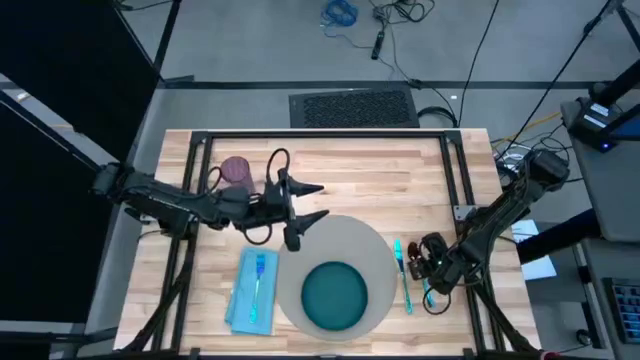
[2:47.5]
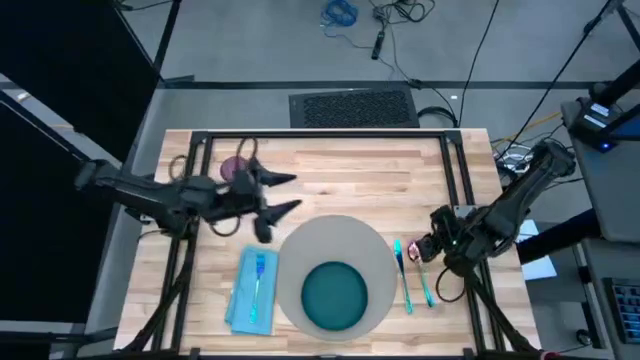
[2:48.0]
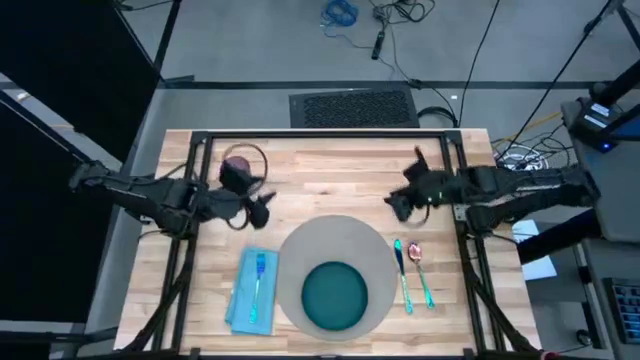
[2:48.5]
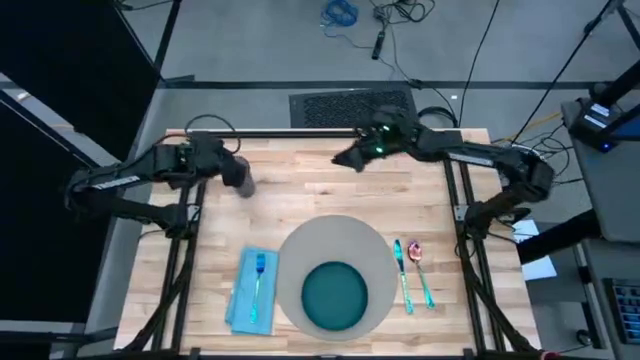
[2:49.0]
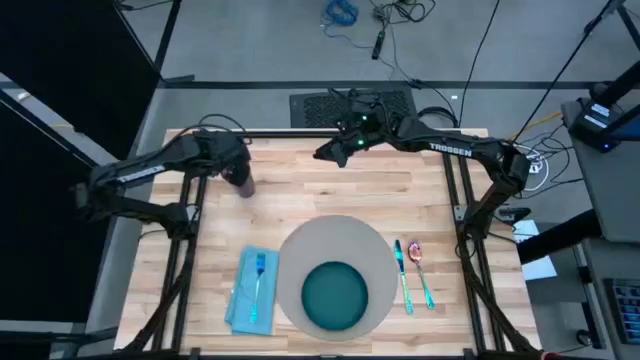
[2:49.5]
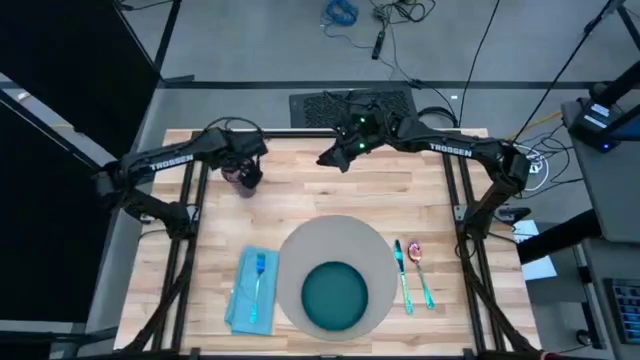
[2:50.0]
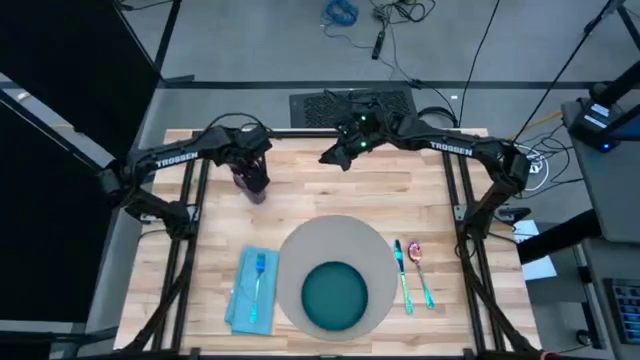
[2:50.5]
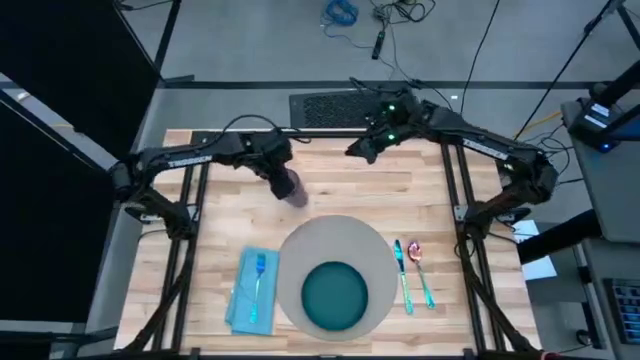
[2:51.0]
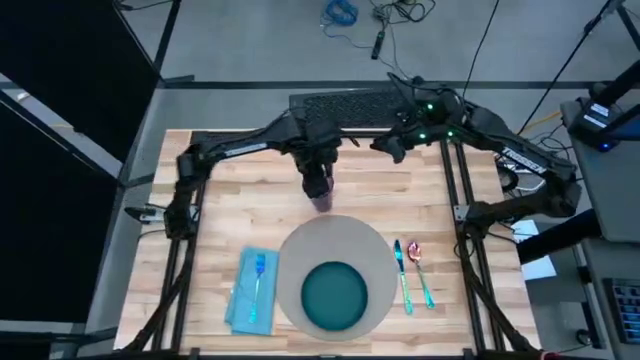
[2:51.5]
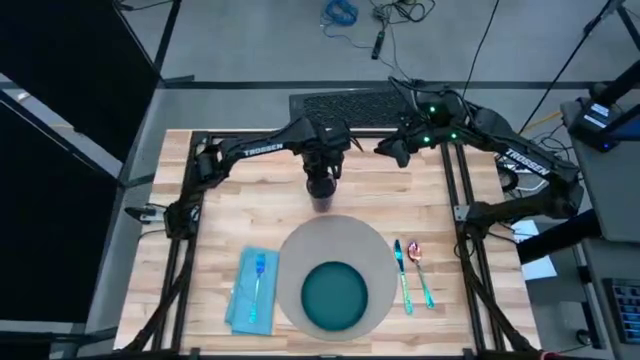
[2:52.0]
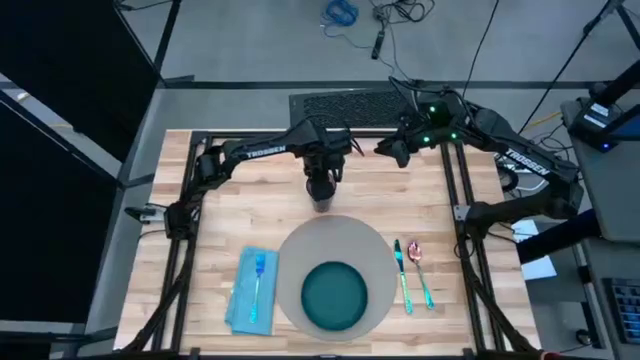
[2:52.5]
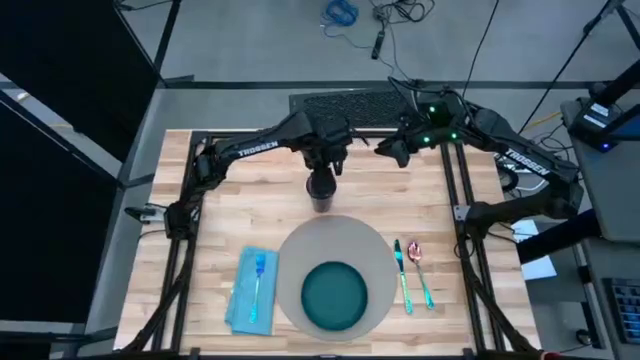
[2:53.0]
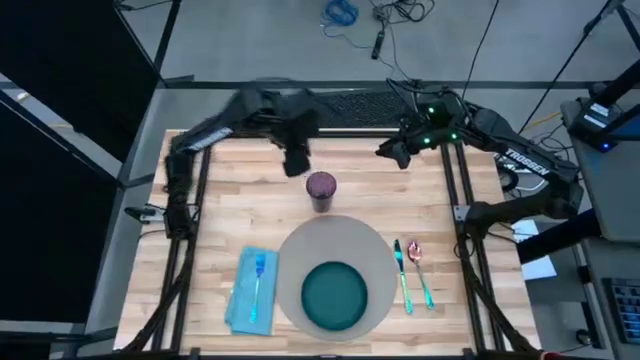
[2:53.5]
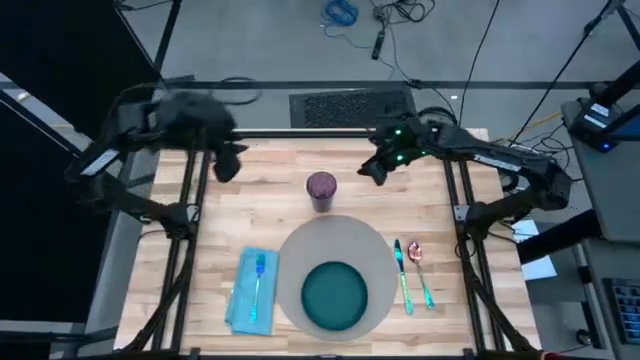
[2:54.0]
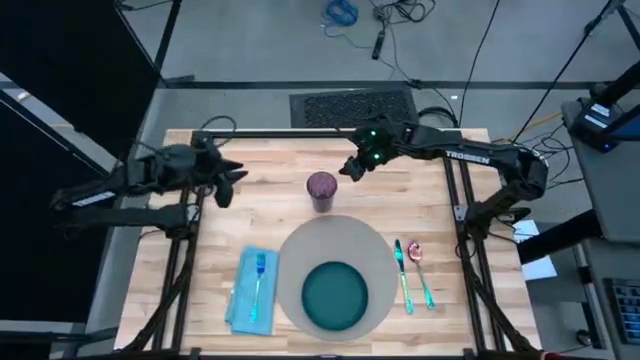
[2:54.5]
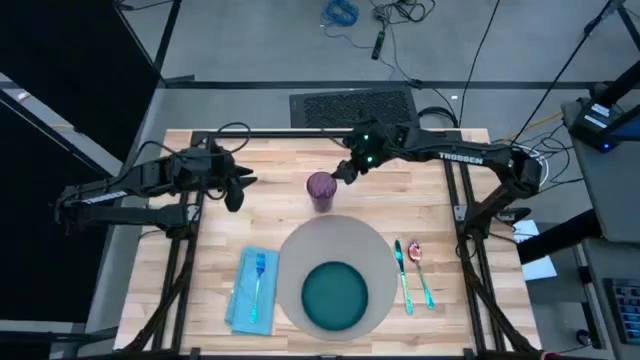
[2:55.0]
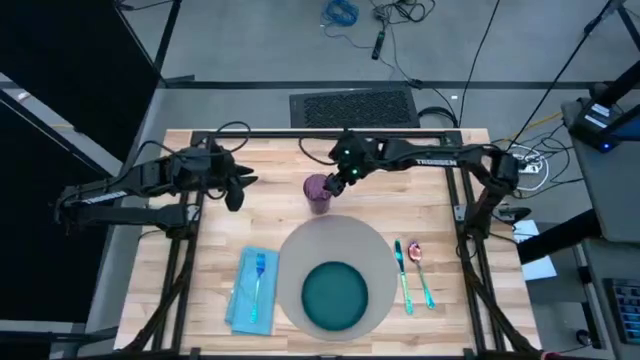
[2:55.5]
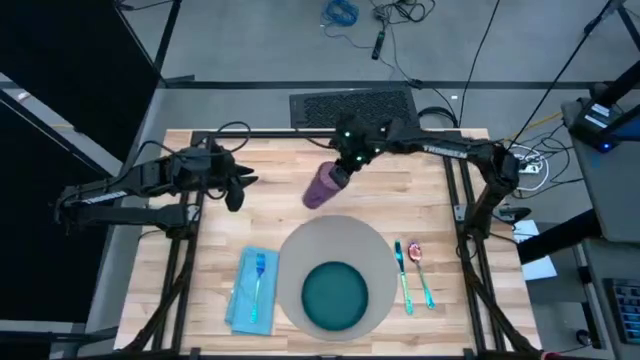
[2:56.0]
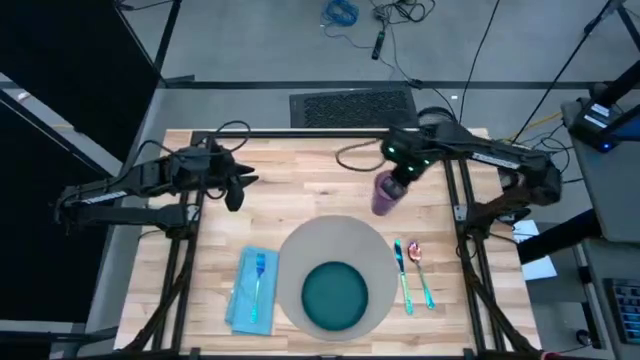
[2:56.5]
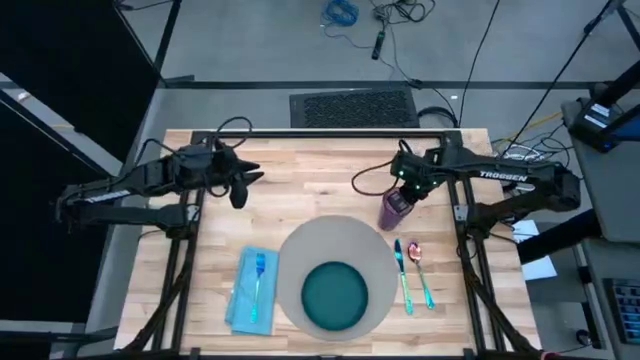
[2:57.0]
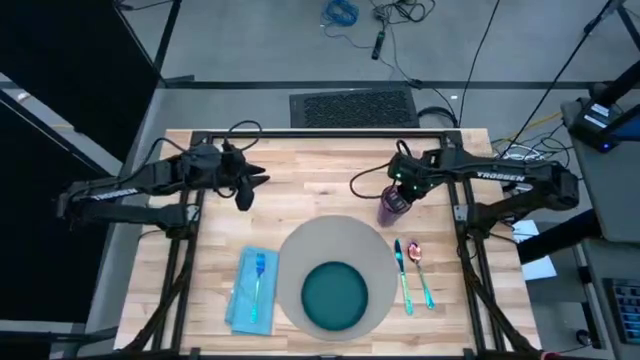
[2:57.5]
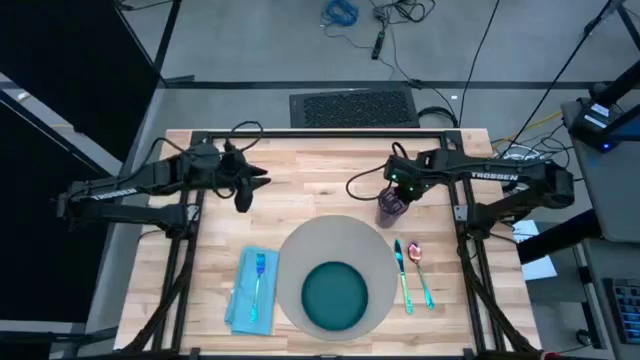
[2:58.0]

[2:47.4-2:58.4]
Task: Set table place
Put the purple cup on the top of the gray mat

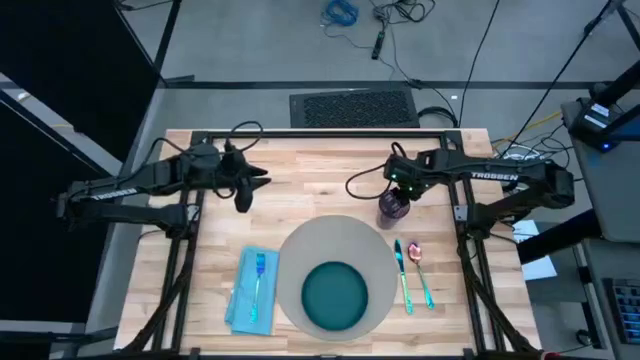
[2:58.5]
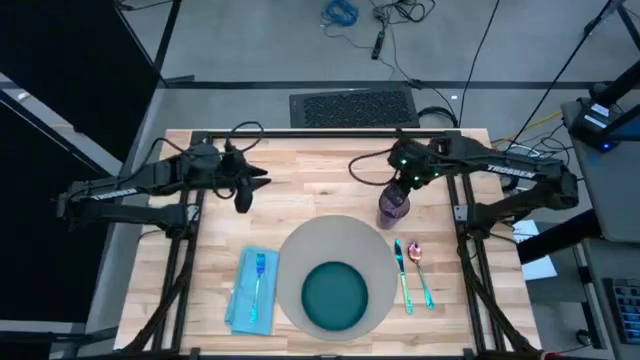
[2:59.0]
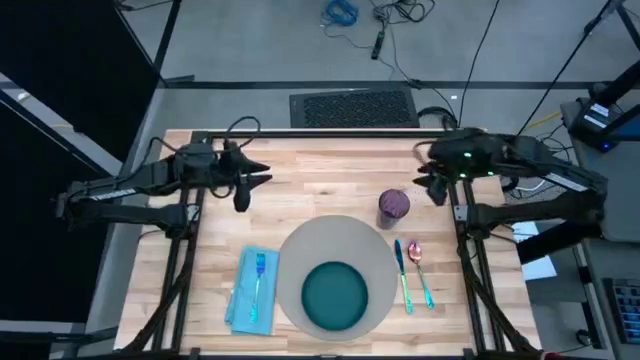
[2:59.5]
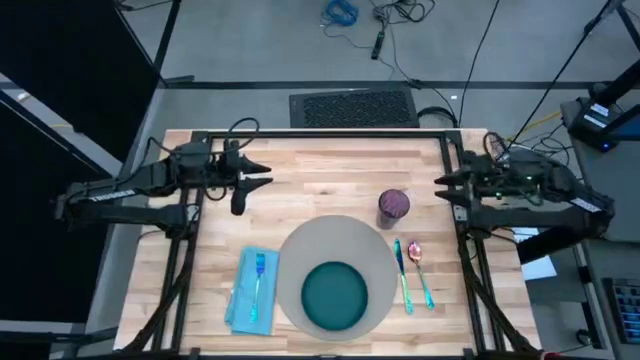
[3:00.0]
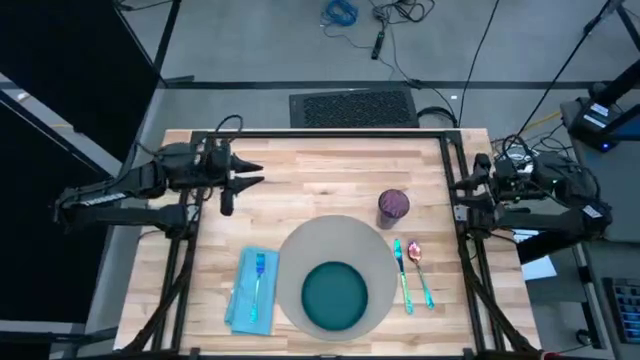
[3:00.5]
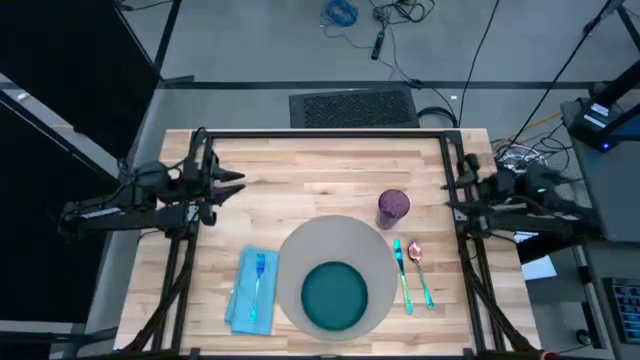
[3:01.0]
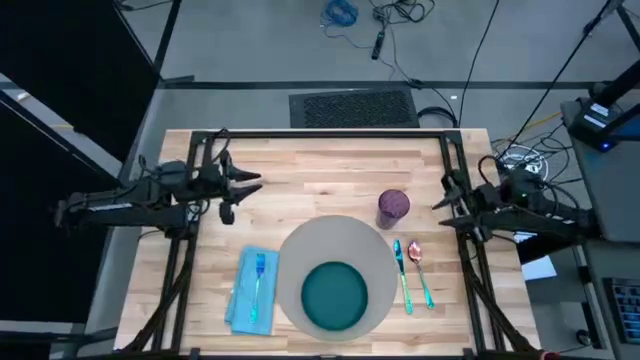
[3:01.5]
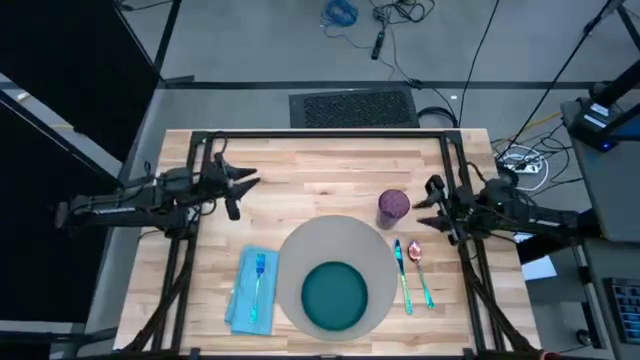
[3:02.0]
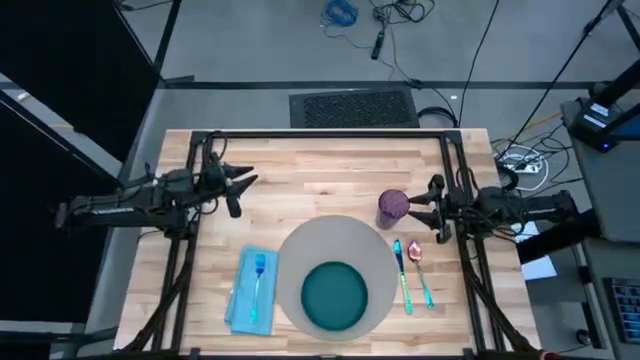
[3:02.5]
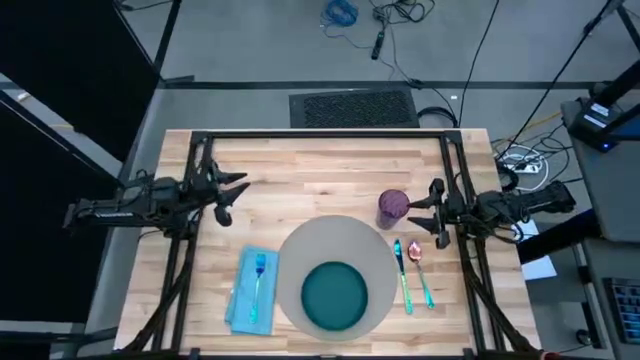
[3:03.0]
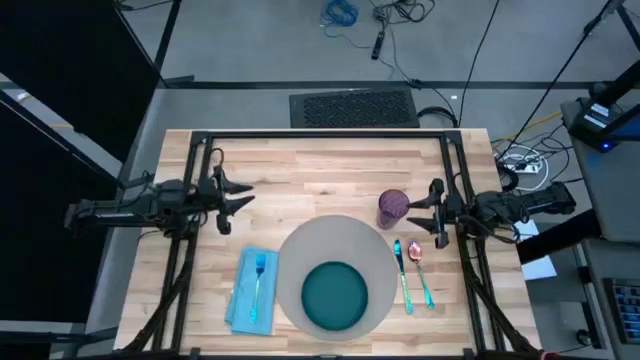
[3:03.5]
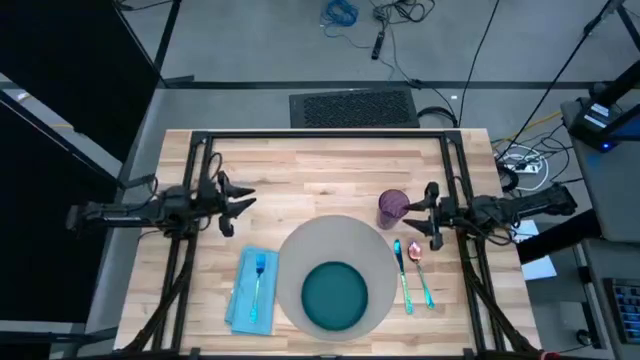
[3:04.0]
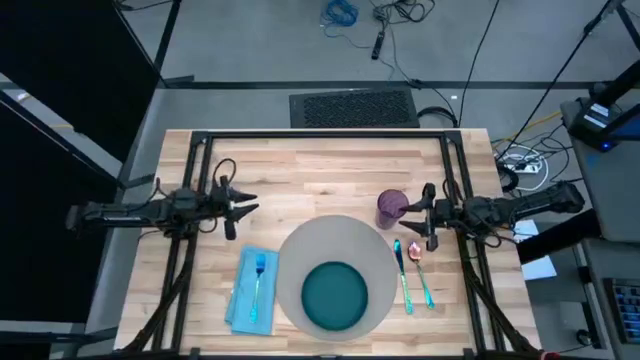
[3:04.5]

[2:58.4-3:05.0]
Put the purple cup on the top of the gray mat

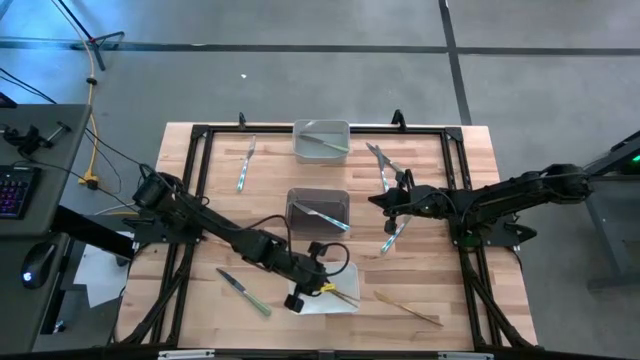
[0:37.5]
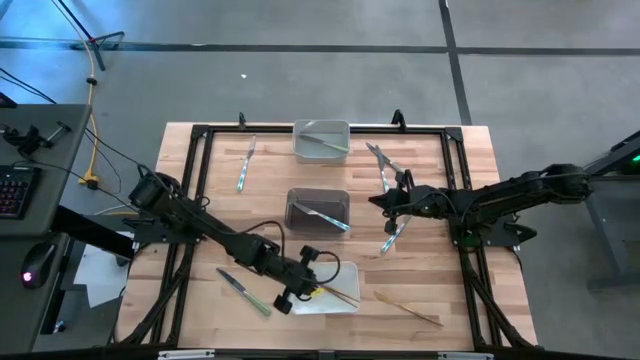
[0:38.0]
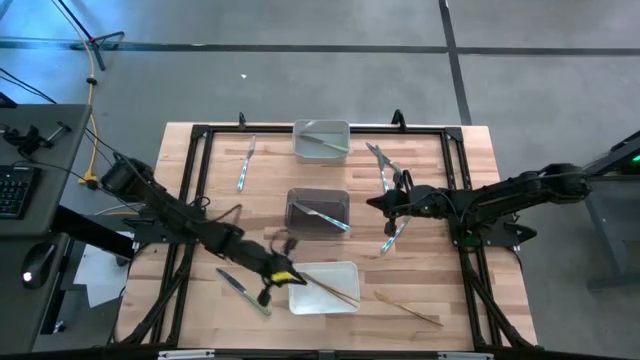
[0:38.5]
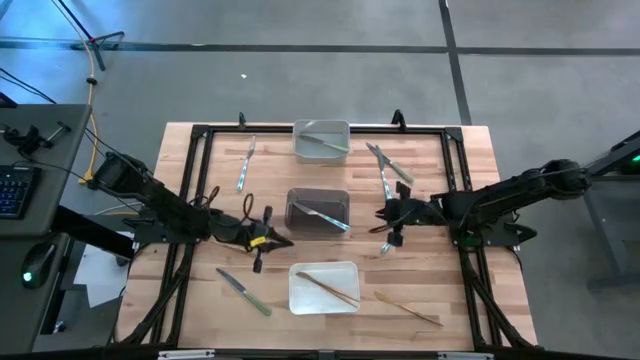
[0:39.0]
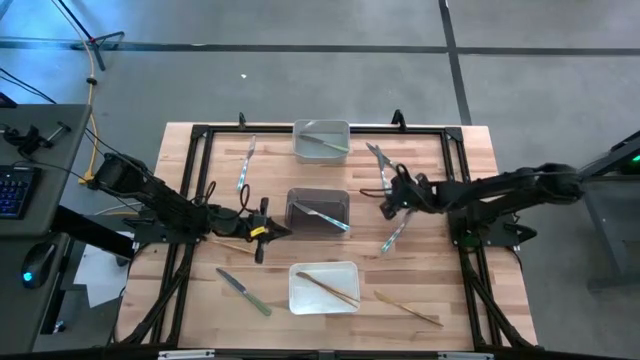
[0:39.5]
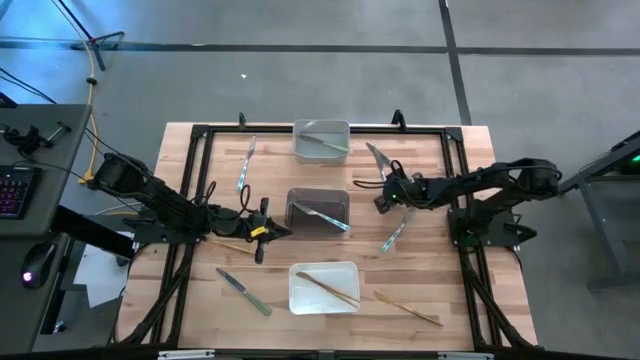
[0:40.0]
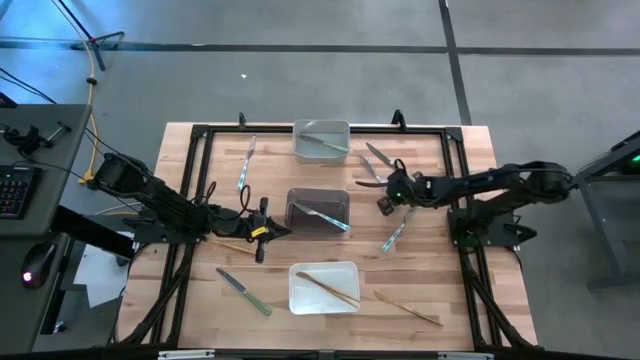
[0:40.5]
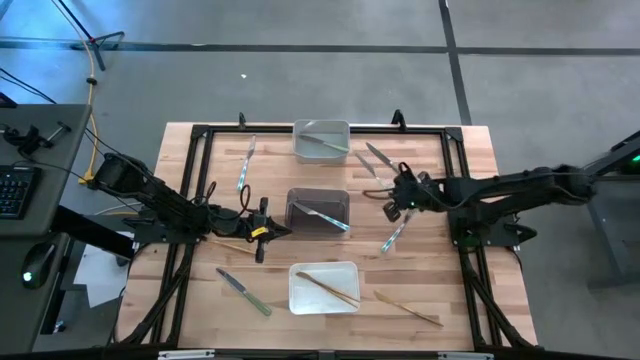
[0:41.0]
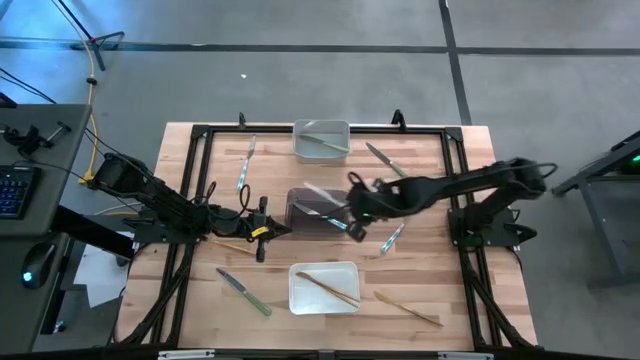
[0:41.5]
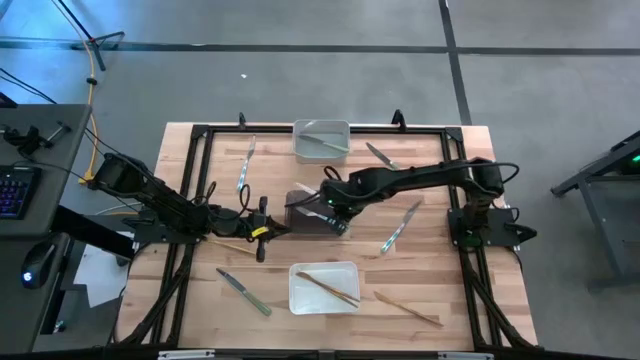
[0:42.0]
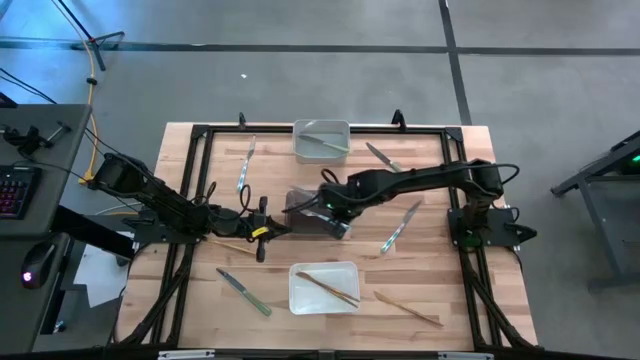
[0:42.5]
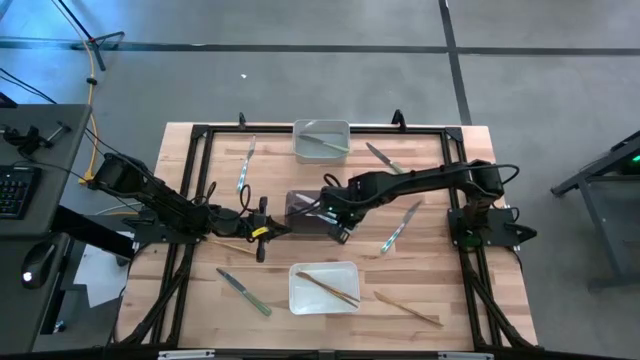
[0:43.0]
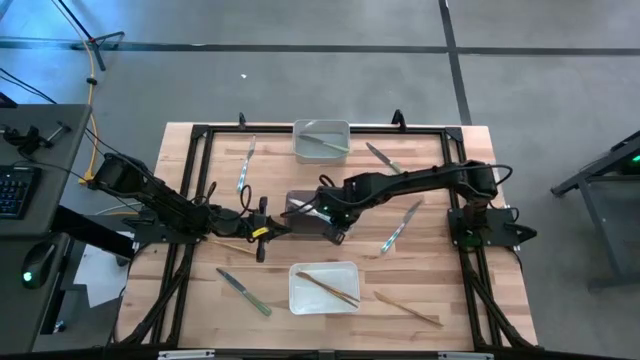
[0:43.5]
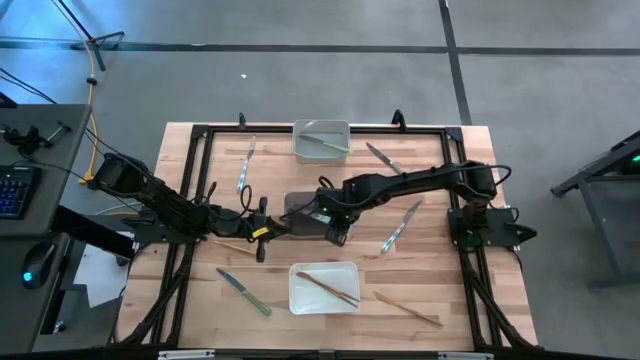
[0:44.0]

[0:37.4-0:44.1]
Task: Sort silverware by color (type)
Put the blue patterned table knife into the black bin
